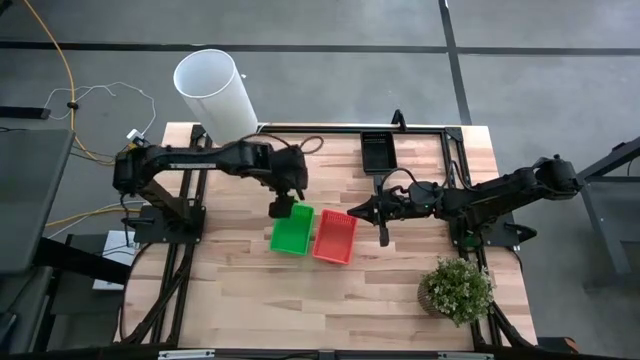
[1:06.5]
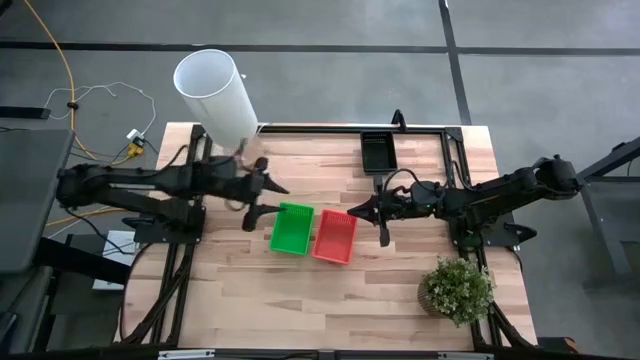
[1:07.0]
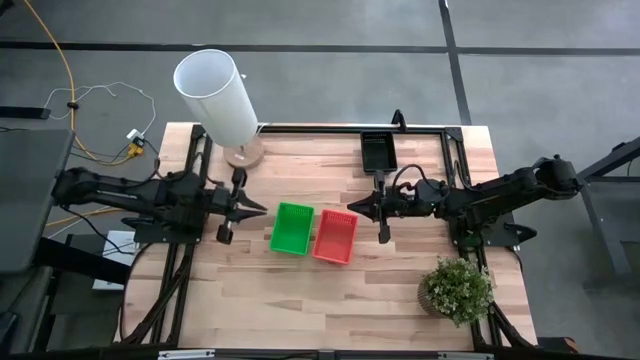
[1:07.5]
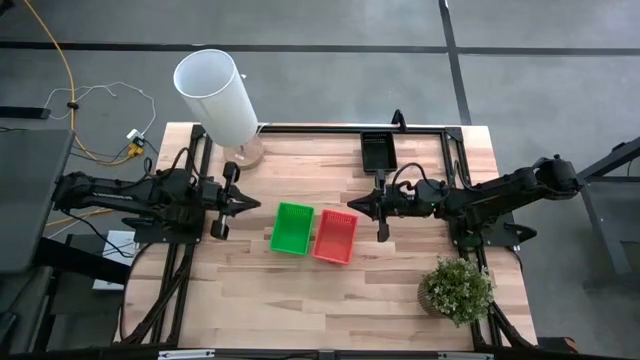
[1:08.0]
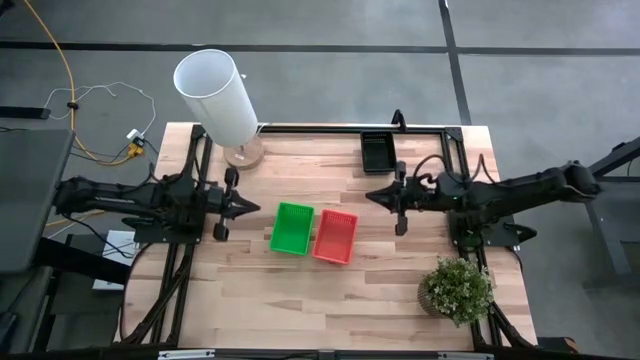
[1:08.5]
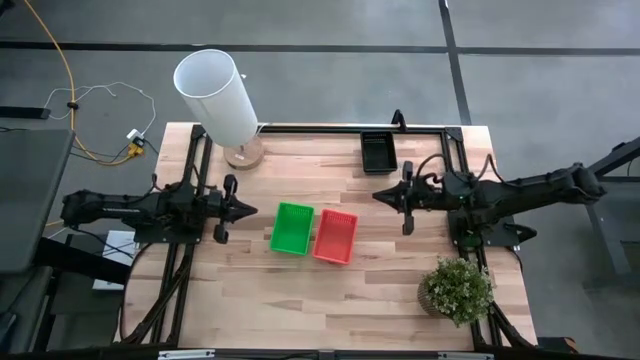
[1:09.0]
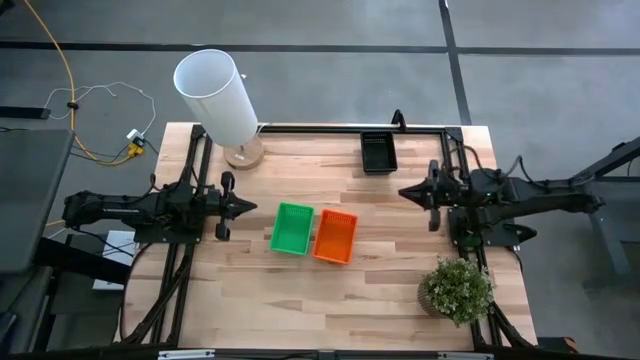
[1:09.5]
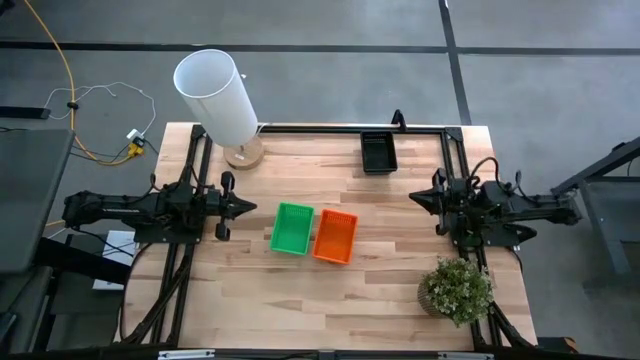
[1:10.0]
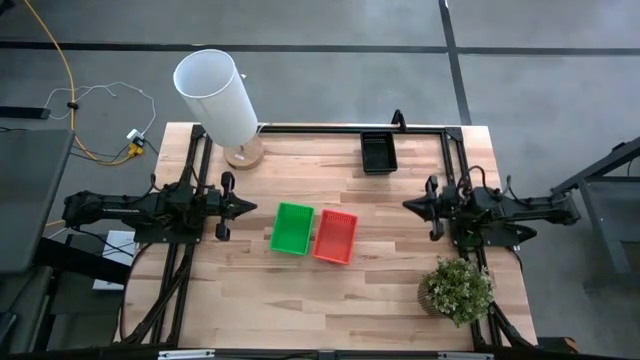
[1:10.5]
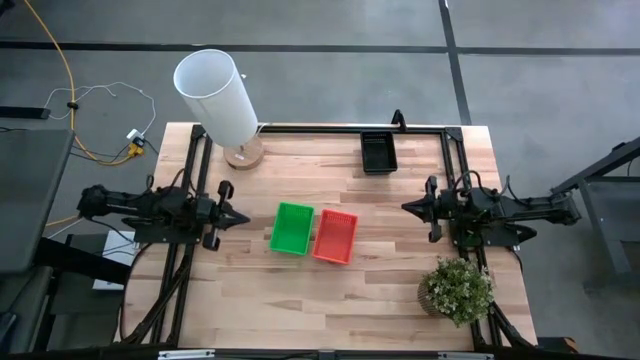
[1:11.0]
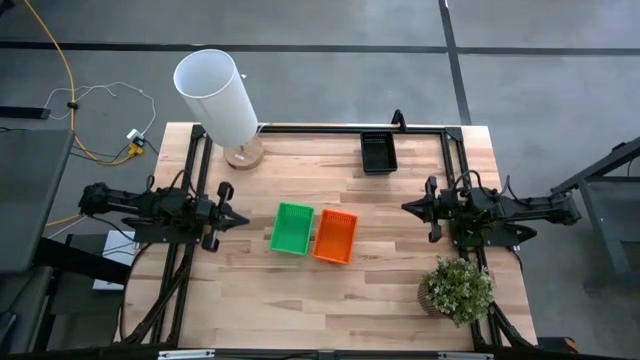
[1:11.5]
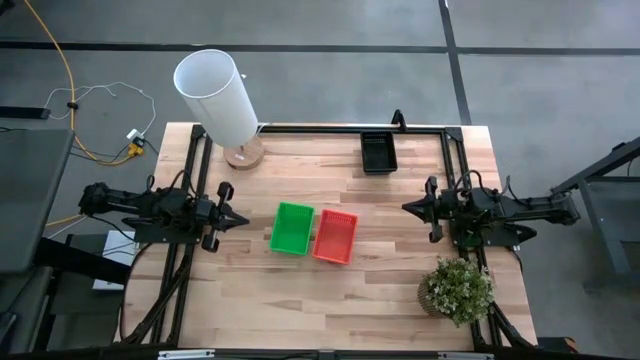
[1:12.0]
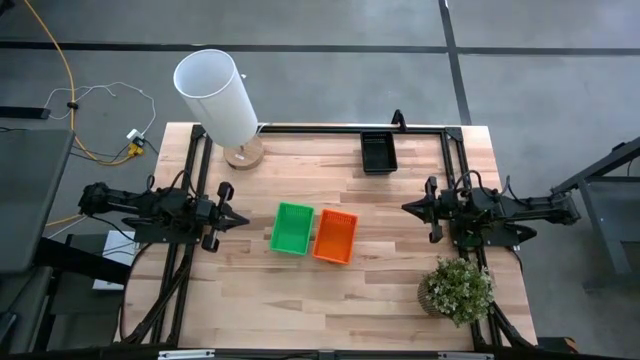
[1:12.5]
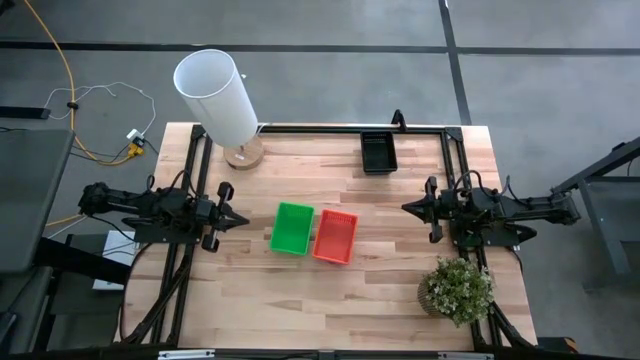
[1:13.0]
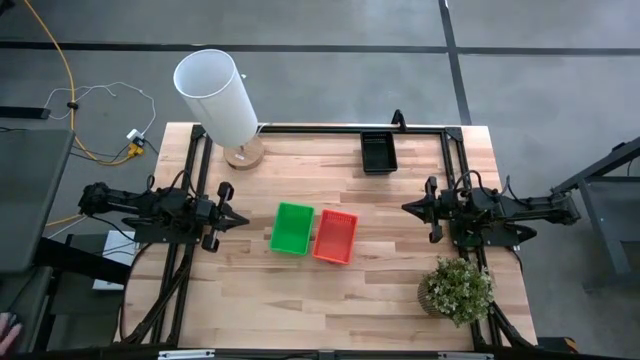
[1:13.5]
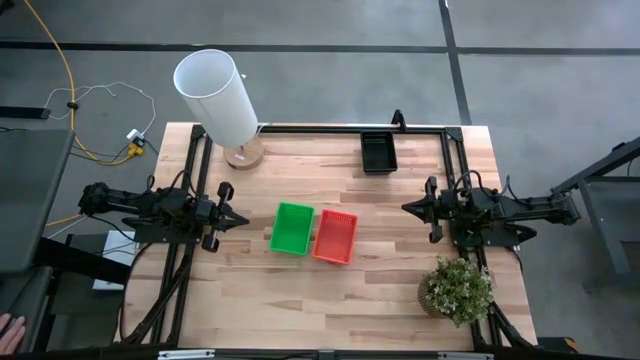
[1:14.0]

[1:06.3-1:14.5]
Return to Home Position
